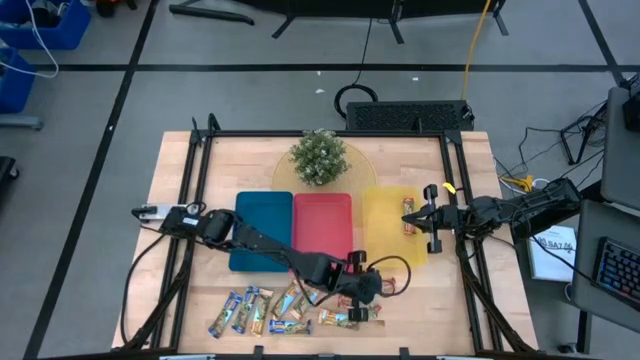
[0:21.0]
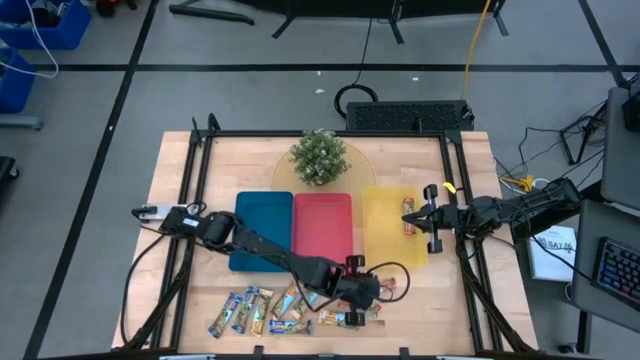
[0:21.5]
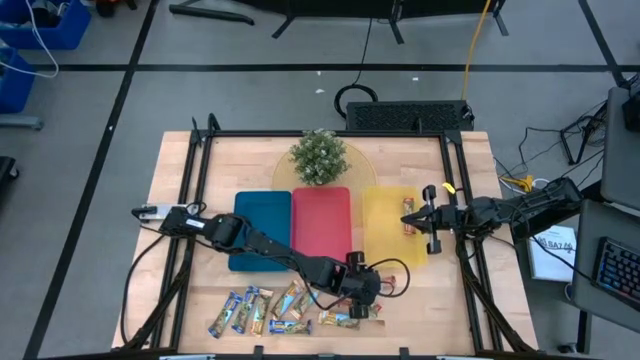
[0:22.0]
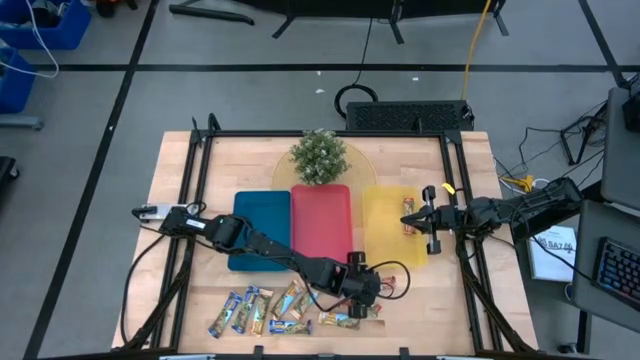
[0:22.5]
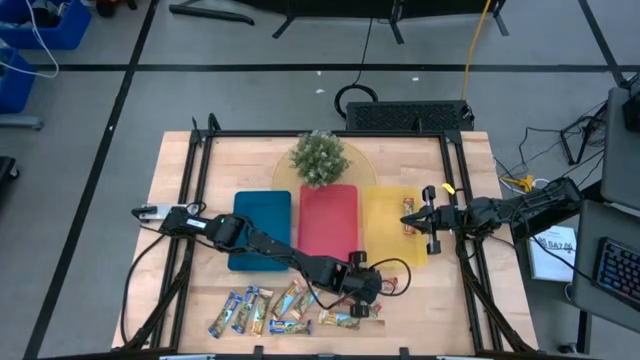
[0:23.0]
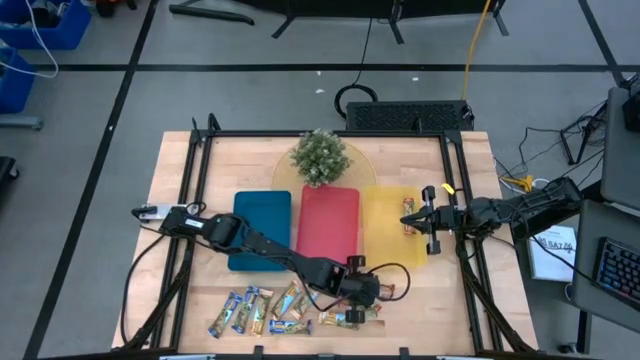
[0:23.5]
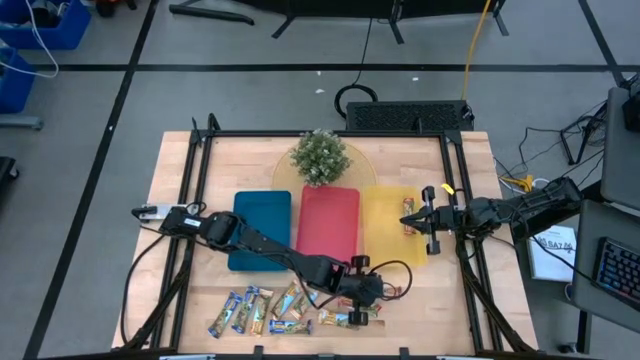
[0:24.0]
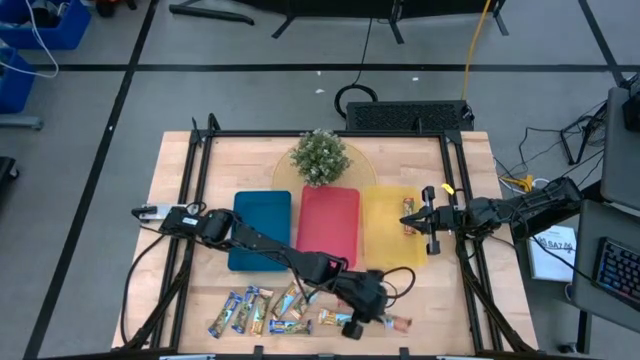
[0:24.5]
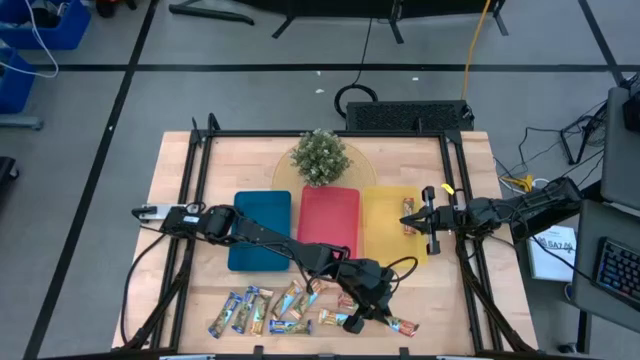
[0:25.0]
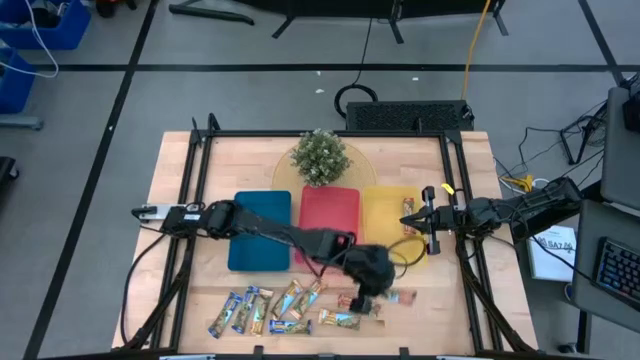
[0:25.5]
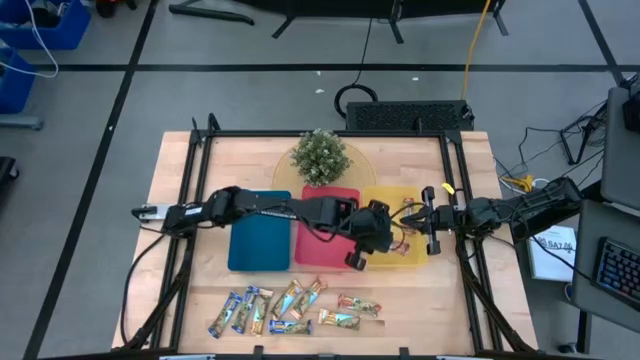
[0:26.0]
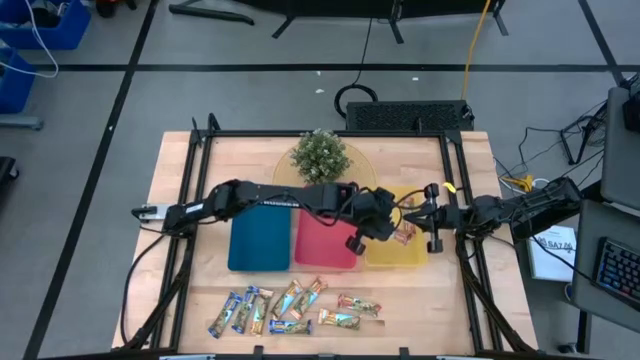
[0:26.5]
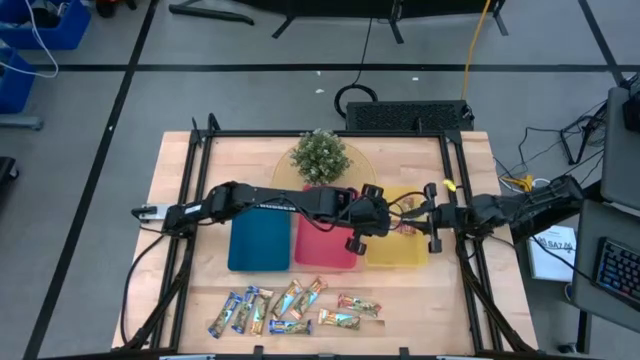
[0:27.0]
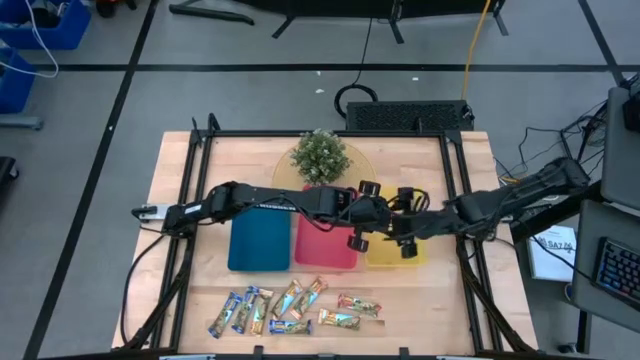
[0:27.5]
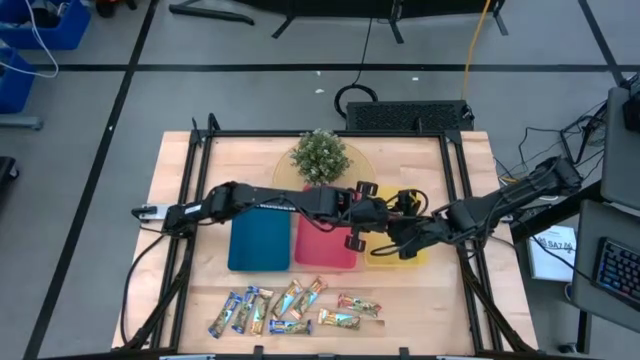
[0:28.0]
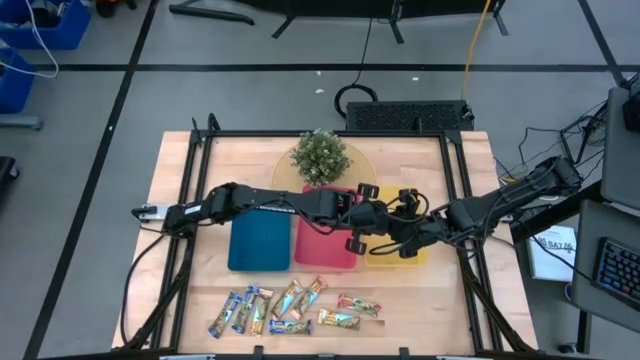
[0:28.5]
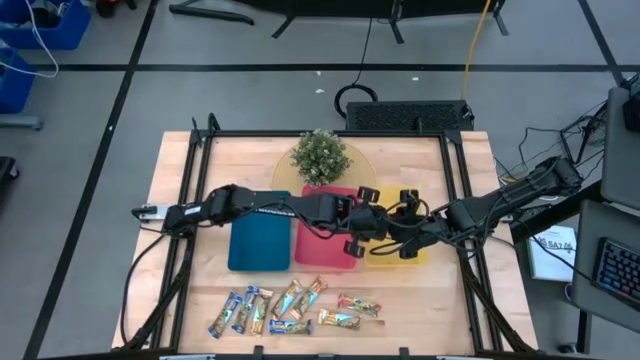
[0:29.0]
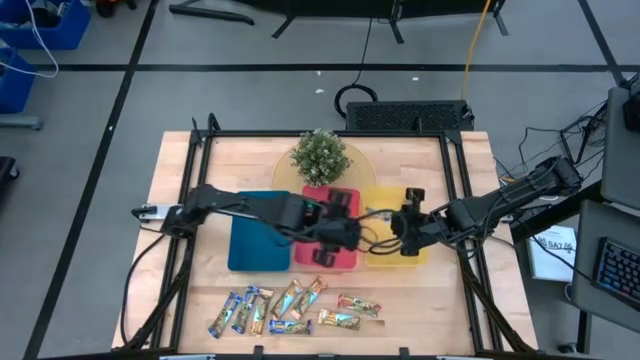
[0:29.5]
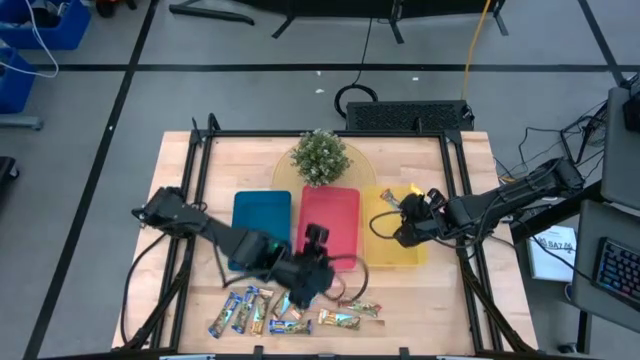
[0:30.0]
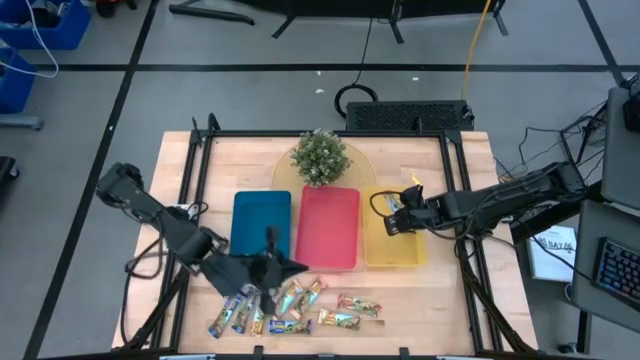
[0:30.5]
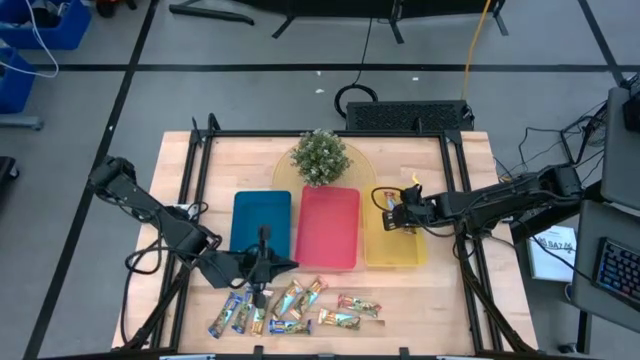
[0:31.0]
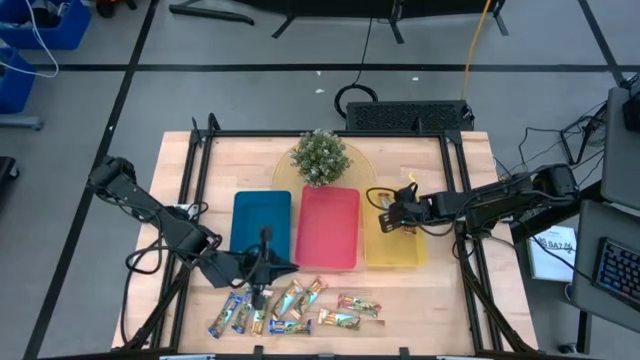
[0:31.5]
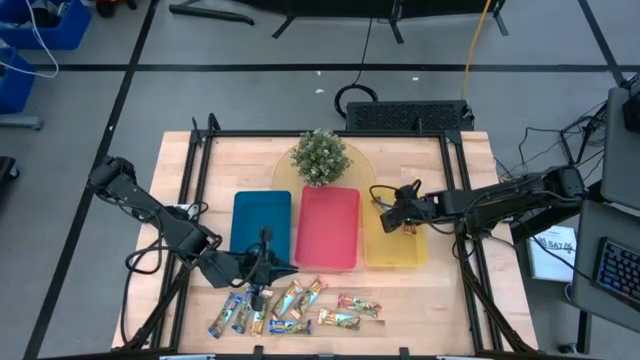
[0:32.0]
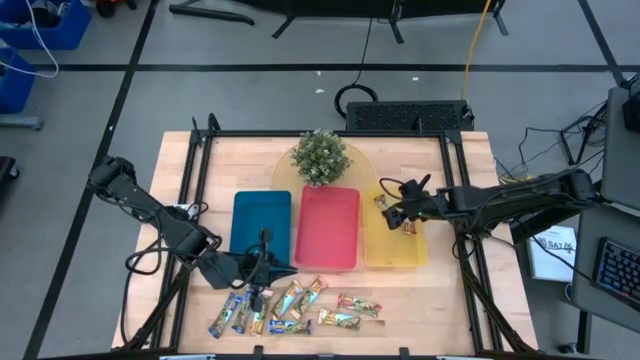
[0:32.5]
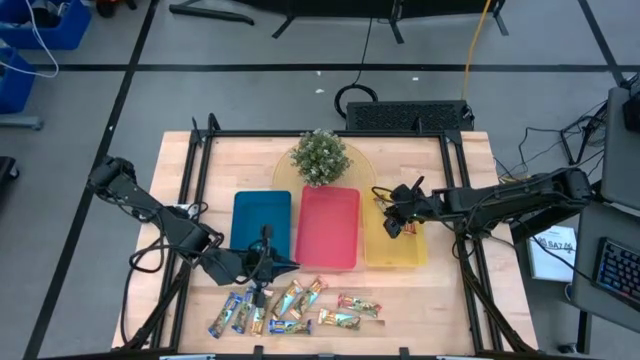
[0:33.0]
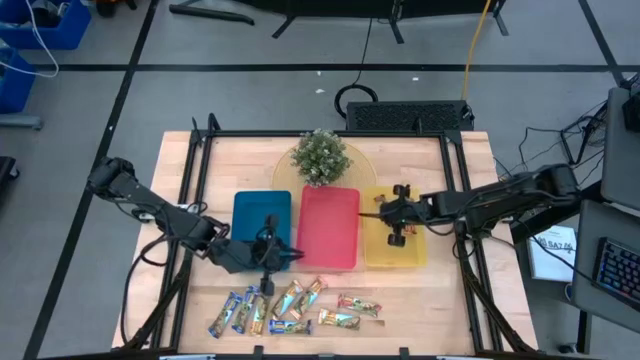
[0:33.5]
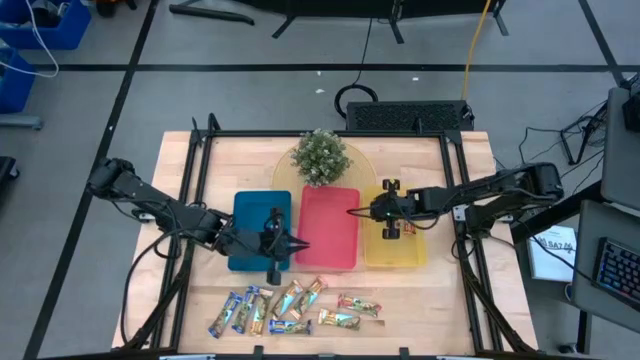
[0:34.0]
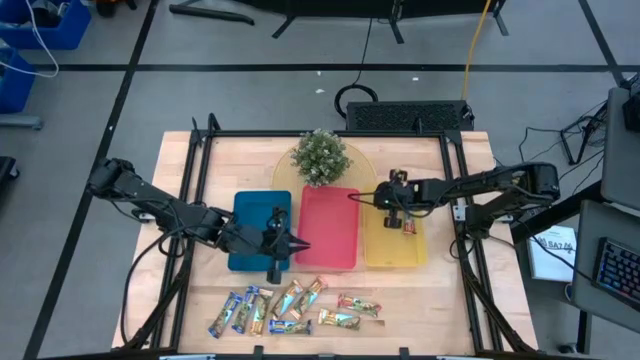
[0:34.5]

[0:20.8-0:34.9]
Task: Pick and place Granola Bars by type
Put the top red granola bar into the yellow bin

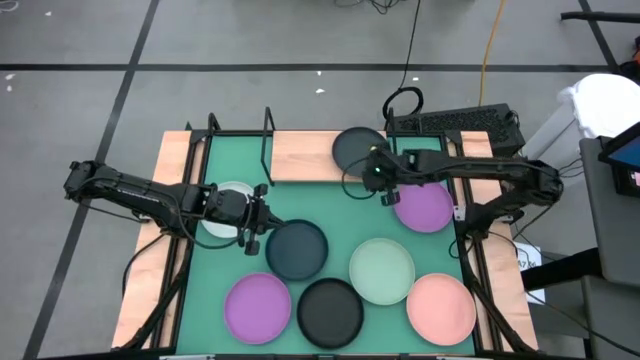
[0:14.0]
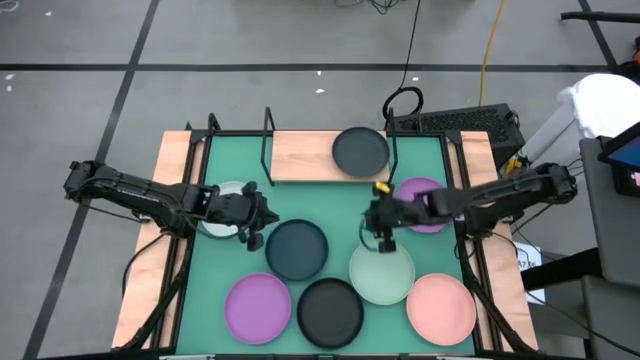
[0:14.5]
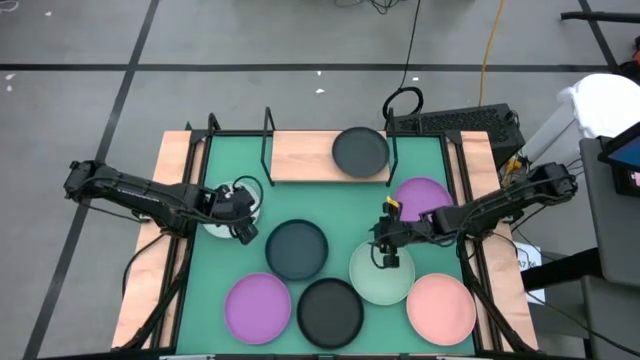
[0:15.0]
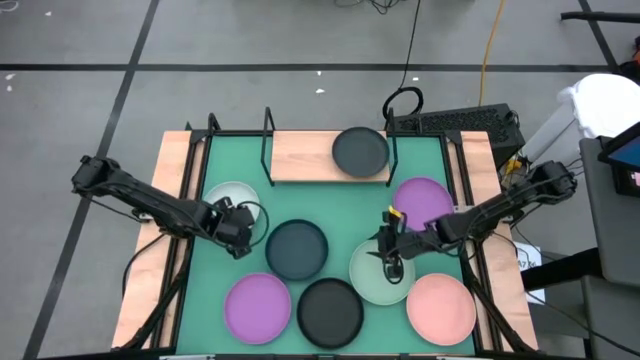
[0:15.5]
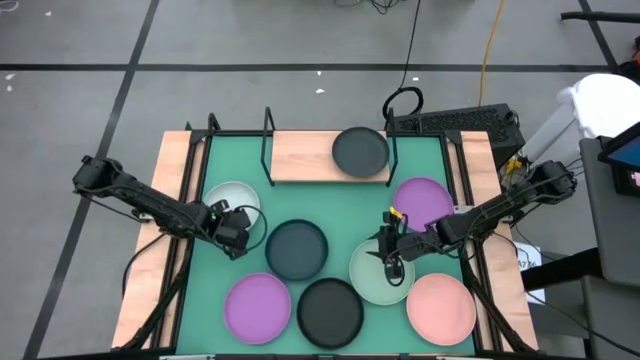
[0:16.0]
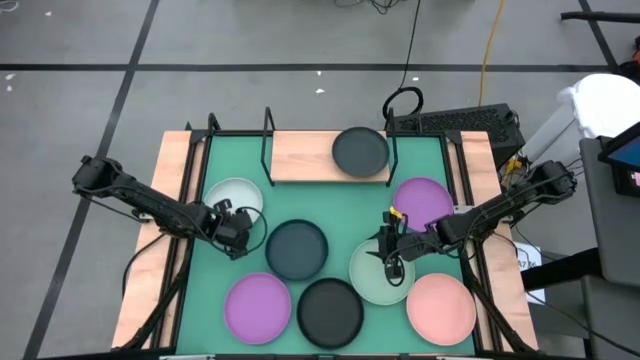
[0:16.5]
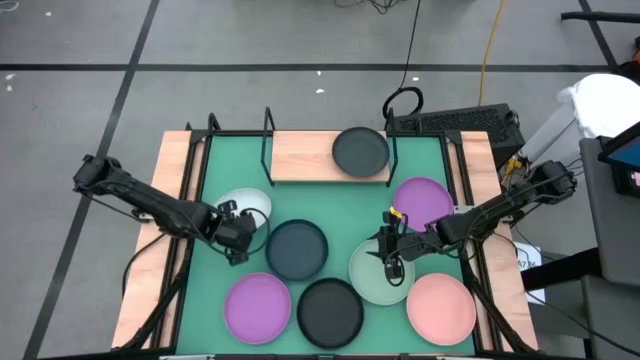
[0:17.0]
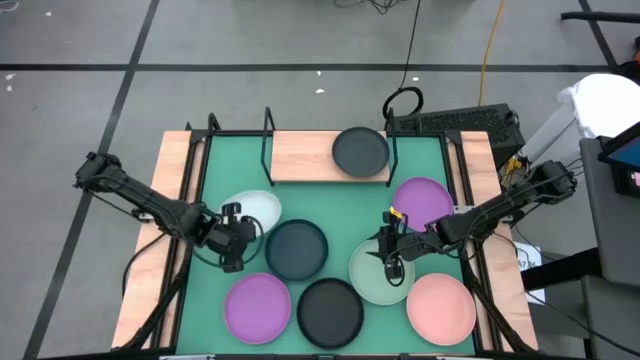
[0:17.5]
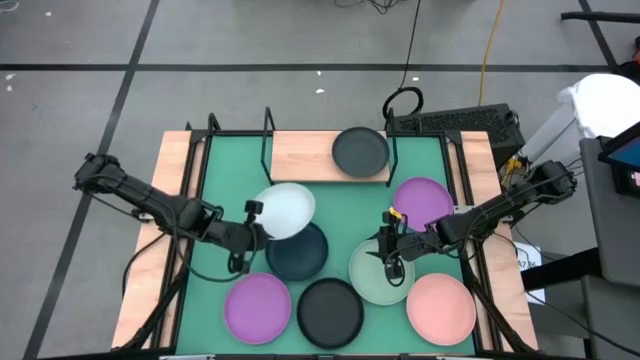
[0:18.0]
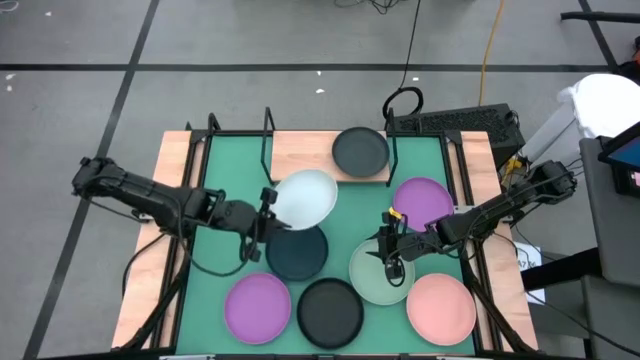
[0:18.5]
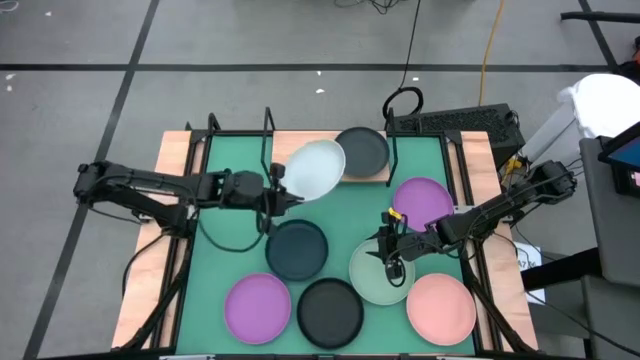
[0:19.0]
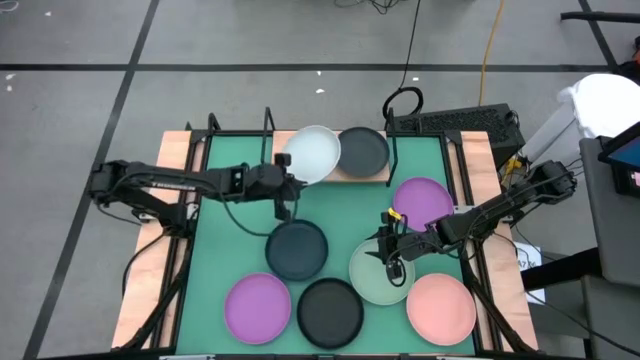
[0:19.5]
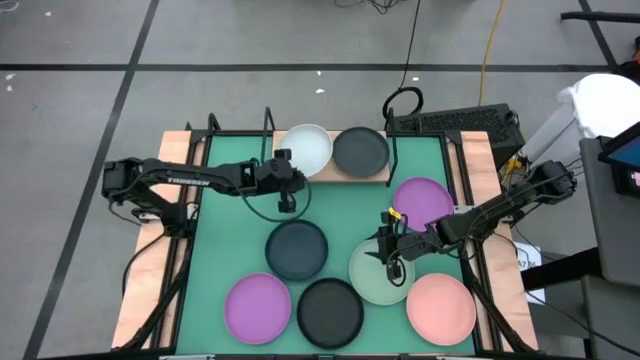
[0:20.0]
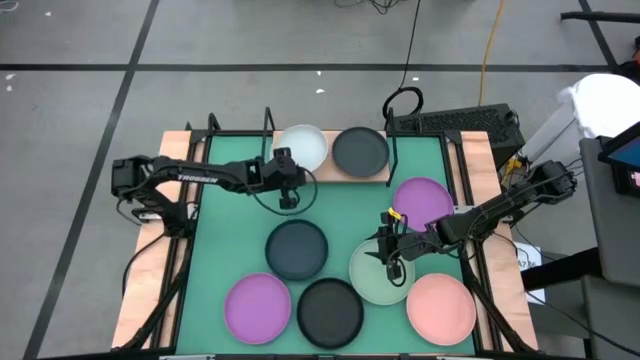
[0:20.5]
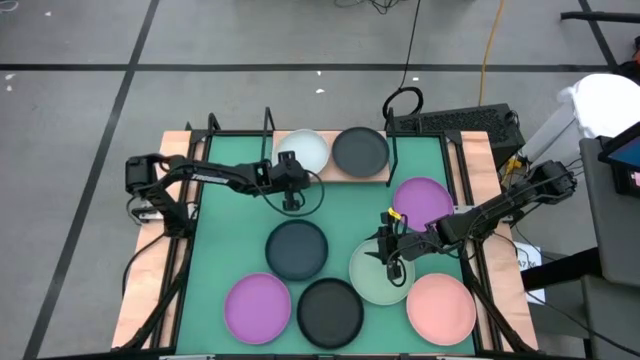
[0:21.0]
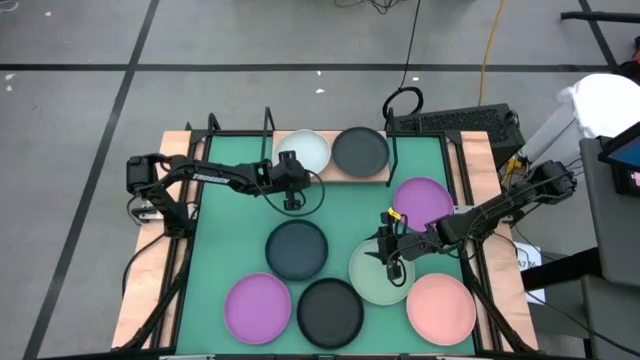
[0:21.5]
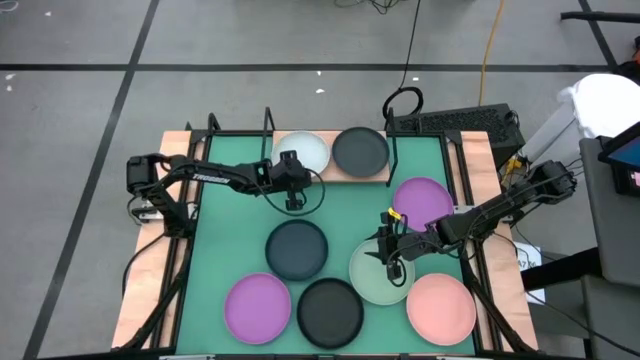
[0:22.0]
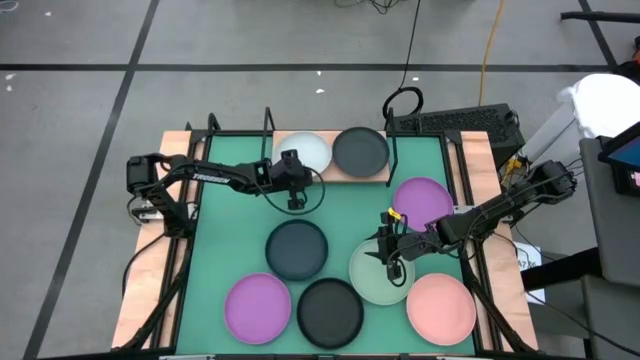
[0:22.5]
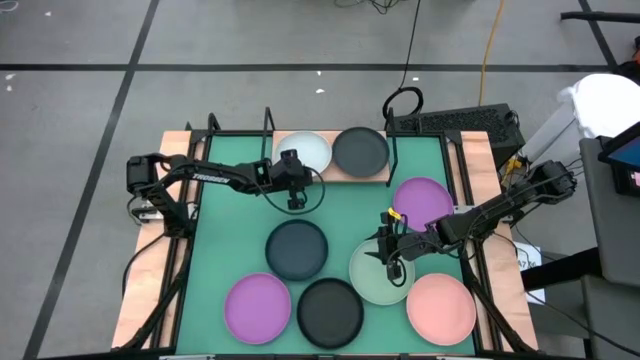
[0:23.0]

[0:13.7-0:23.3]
Task: Place and stack plates onto a shelf
Put the white plate on the shelf
